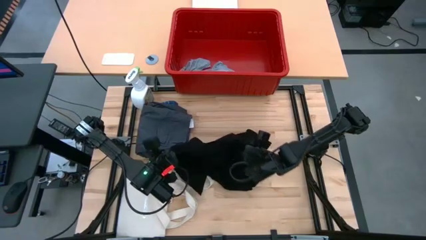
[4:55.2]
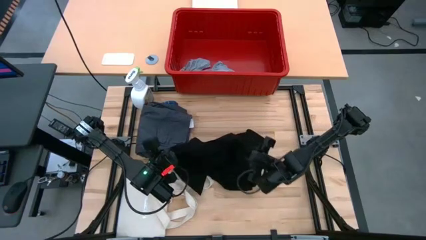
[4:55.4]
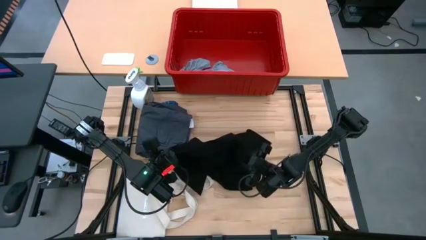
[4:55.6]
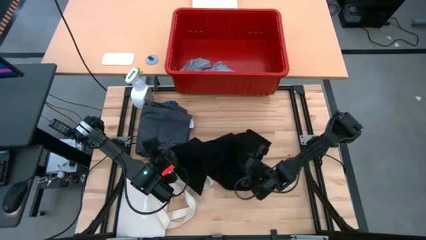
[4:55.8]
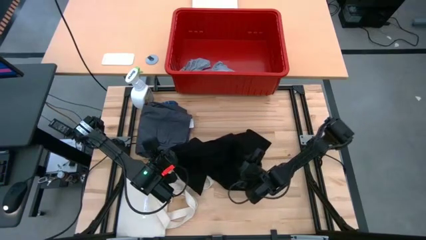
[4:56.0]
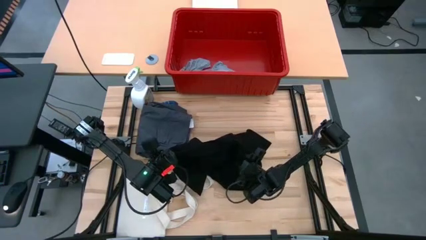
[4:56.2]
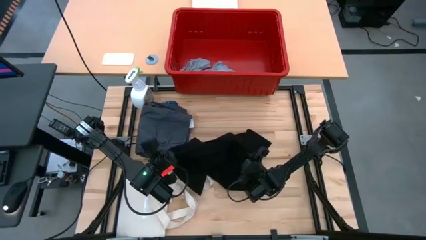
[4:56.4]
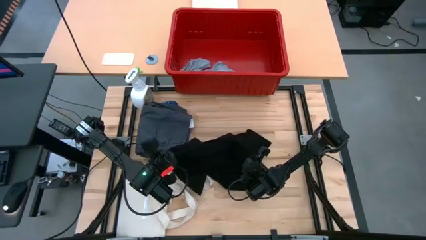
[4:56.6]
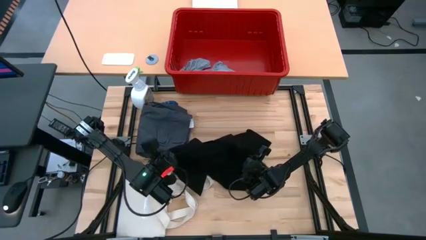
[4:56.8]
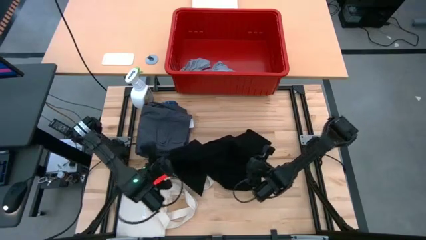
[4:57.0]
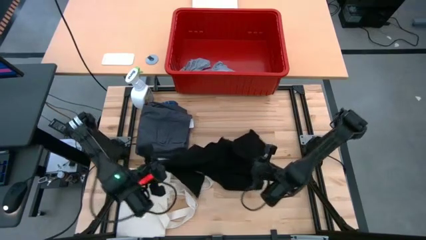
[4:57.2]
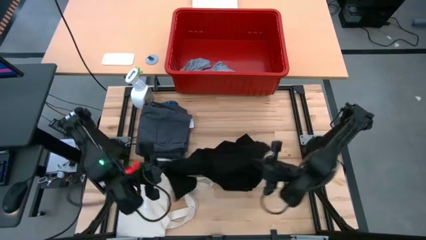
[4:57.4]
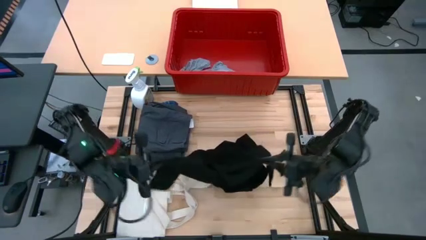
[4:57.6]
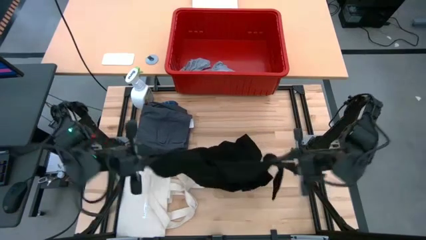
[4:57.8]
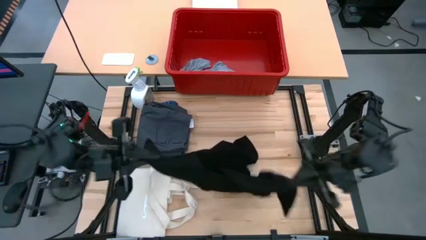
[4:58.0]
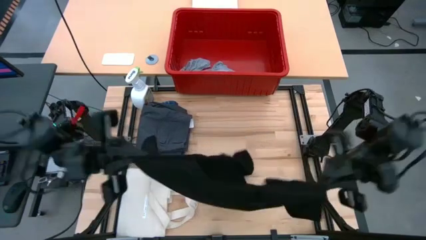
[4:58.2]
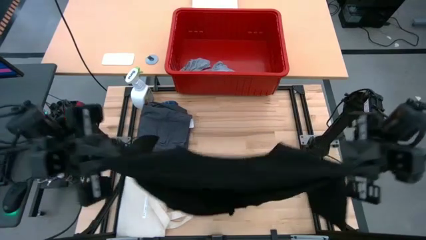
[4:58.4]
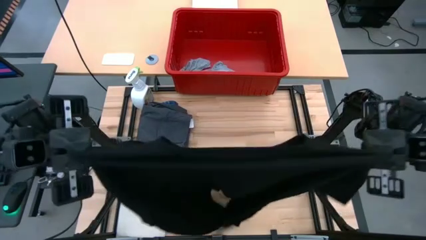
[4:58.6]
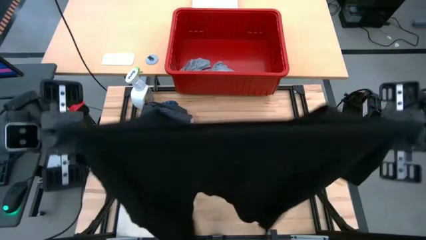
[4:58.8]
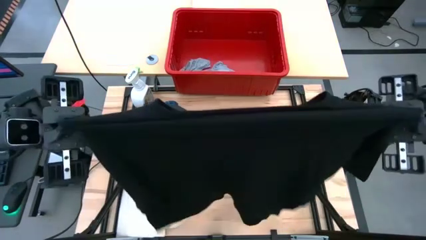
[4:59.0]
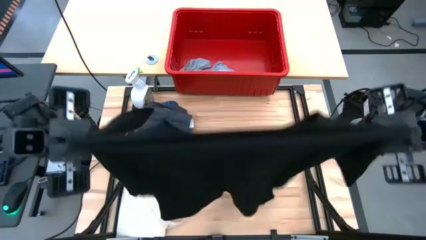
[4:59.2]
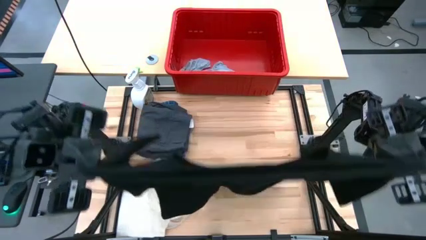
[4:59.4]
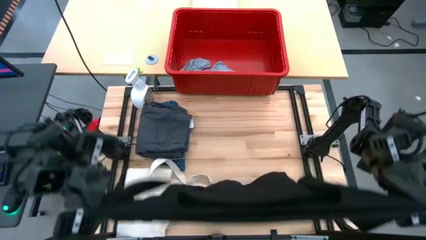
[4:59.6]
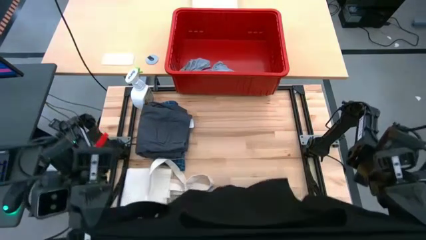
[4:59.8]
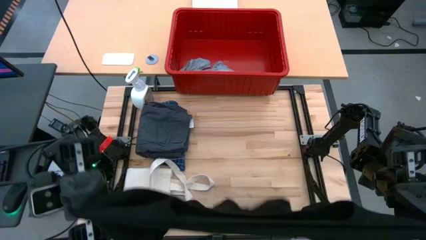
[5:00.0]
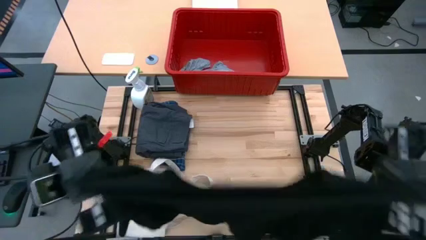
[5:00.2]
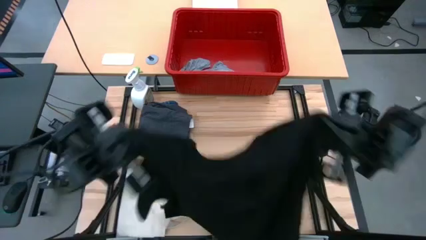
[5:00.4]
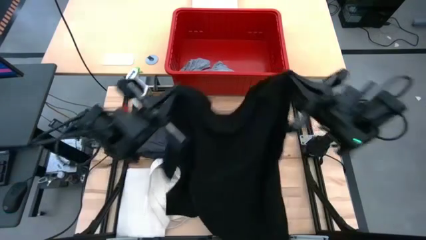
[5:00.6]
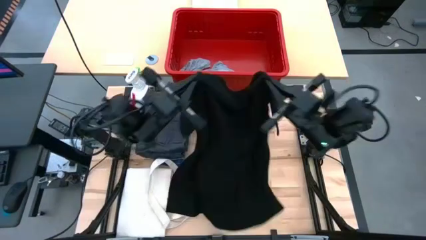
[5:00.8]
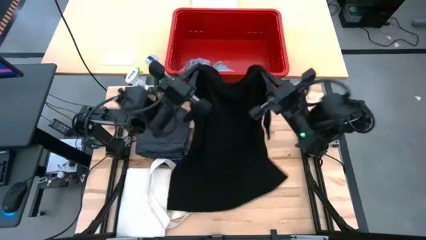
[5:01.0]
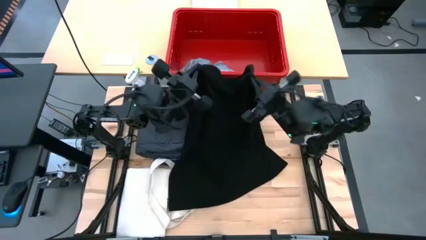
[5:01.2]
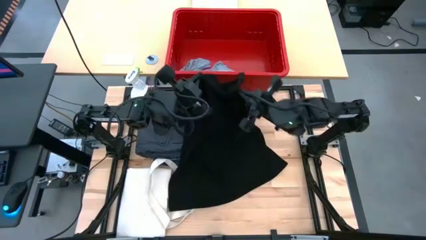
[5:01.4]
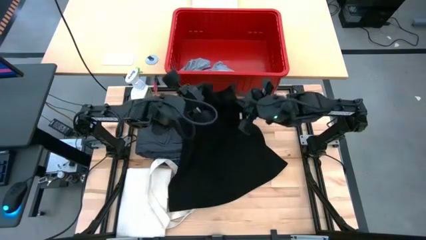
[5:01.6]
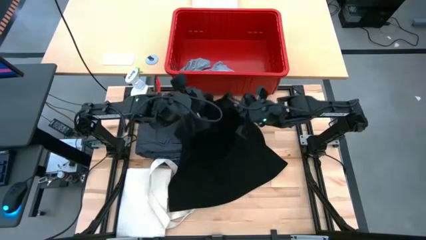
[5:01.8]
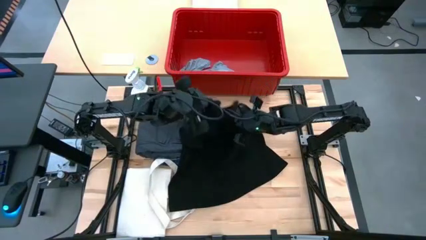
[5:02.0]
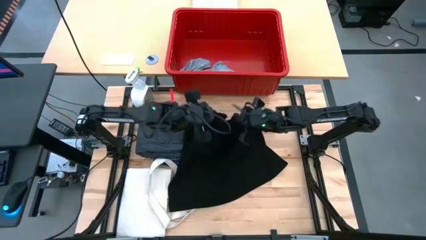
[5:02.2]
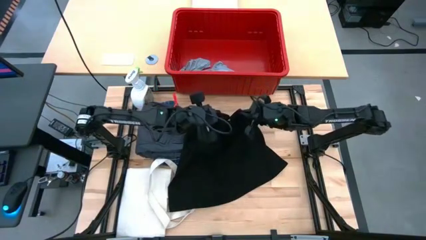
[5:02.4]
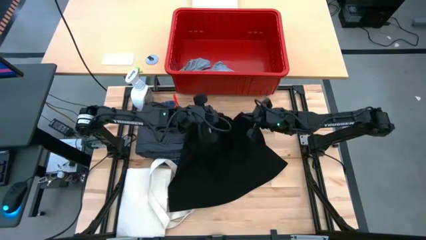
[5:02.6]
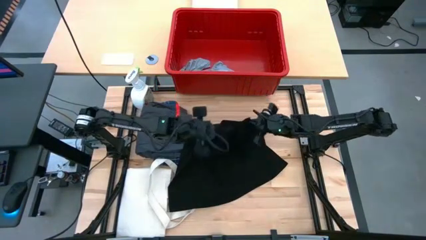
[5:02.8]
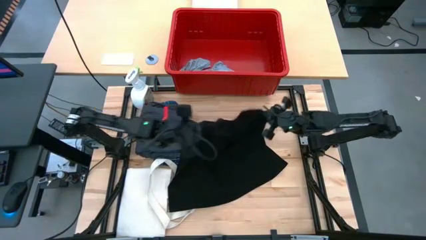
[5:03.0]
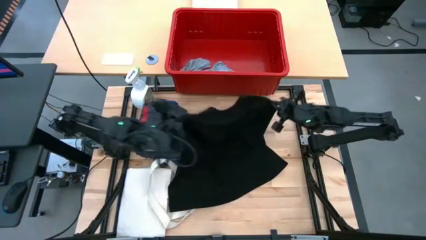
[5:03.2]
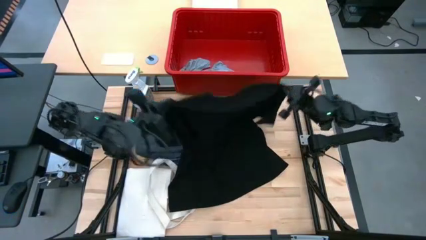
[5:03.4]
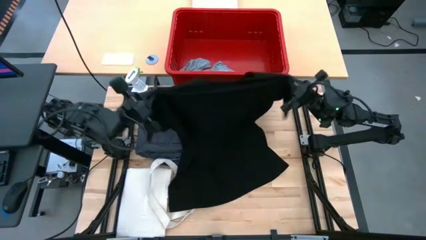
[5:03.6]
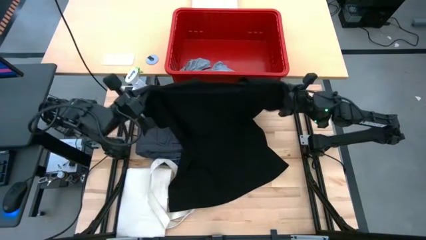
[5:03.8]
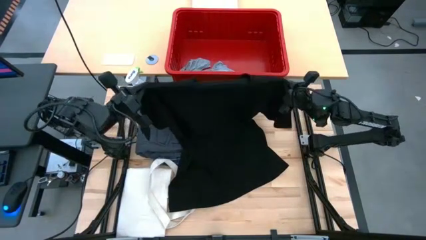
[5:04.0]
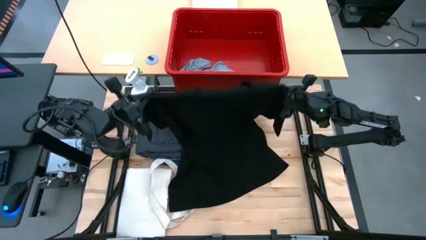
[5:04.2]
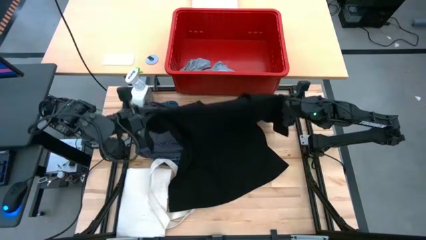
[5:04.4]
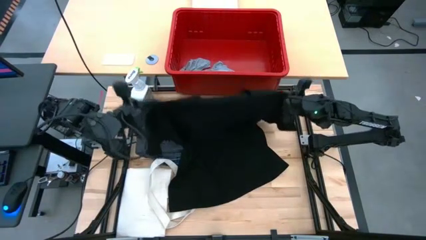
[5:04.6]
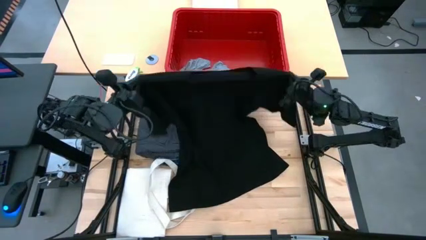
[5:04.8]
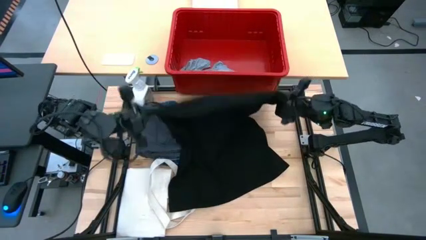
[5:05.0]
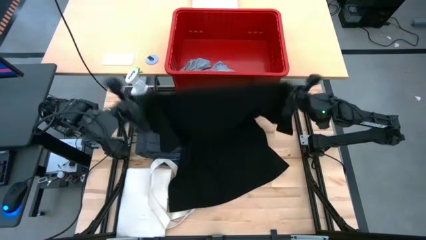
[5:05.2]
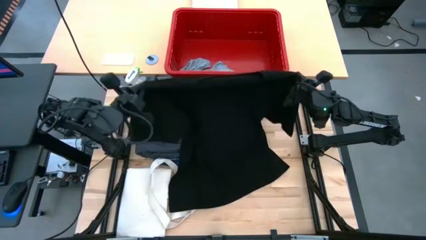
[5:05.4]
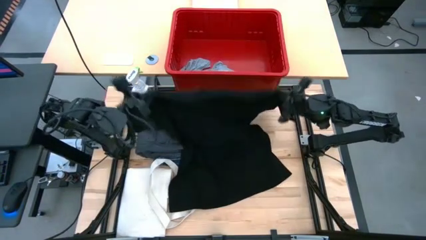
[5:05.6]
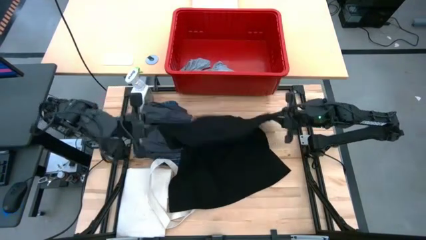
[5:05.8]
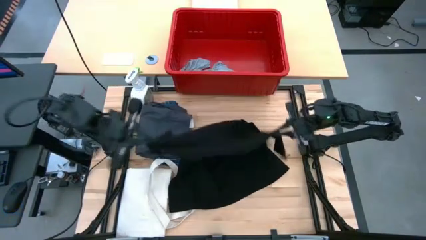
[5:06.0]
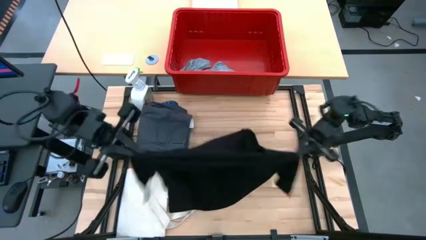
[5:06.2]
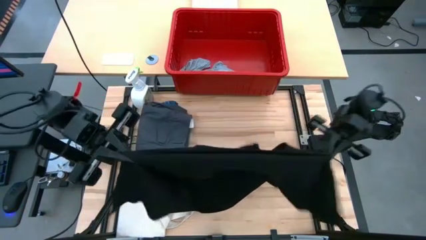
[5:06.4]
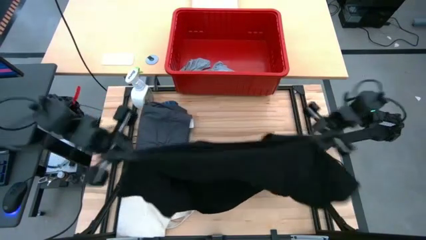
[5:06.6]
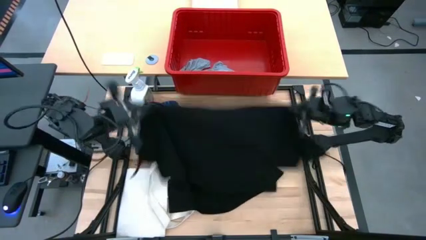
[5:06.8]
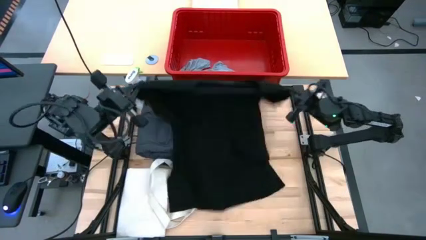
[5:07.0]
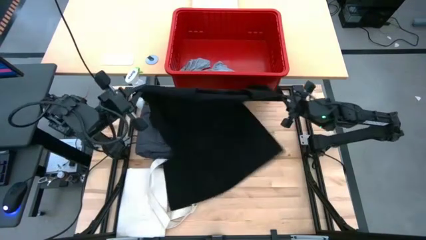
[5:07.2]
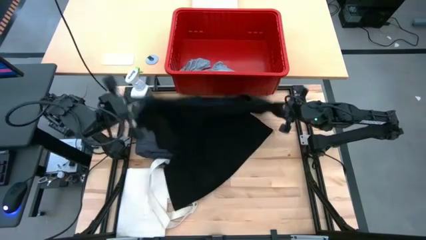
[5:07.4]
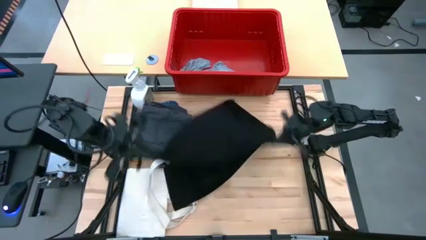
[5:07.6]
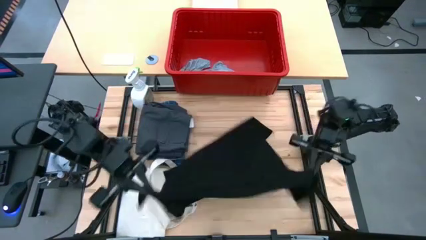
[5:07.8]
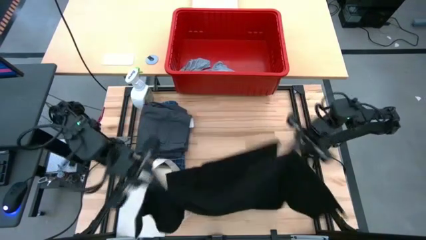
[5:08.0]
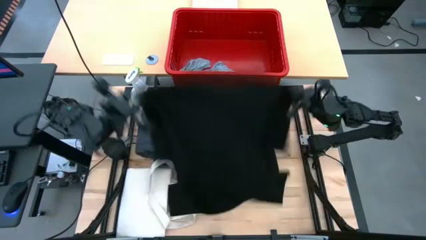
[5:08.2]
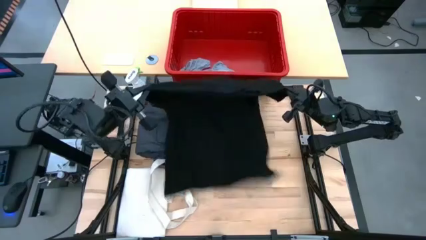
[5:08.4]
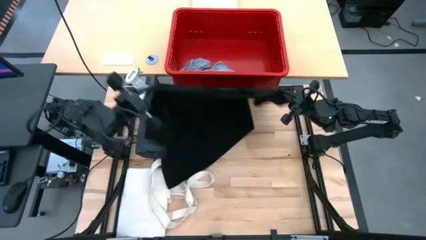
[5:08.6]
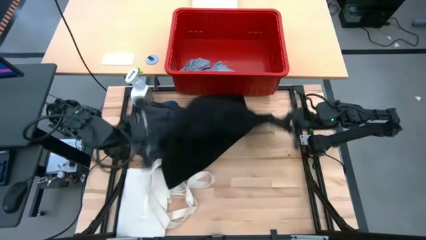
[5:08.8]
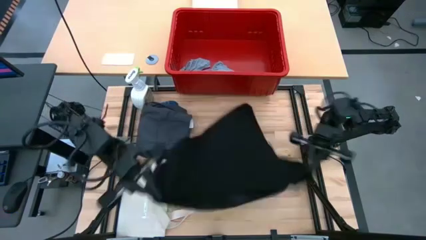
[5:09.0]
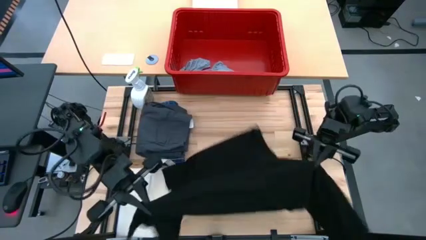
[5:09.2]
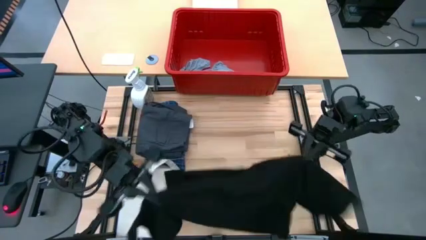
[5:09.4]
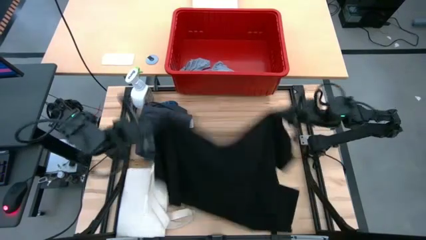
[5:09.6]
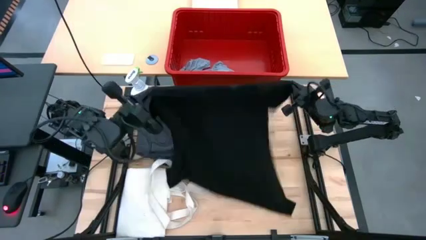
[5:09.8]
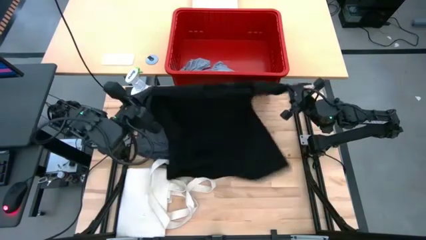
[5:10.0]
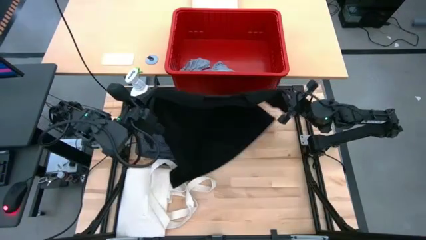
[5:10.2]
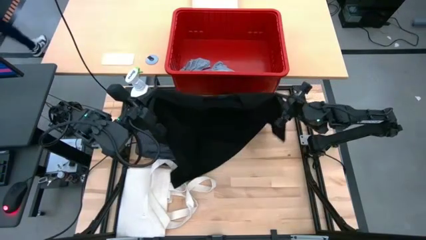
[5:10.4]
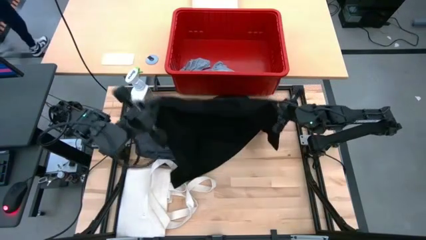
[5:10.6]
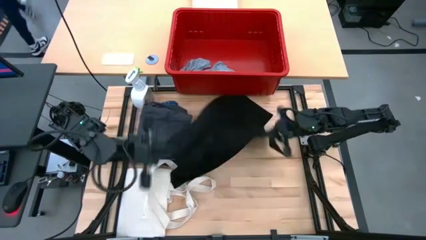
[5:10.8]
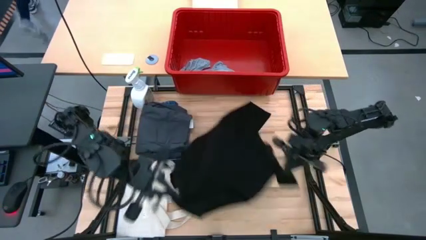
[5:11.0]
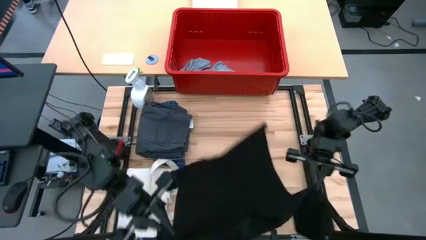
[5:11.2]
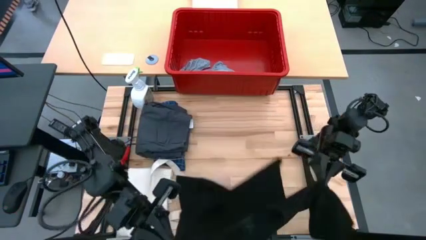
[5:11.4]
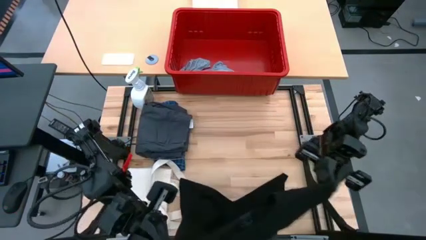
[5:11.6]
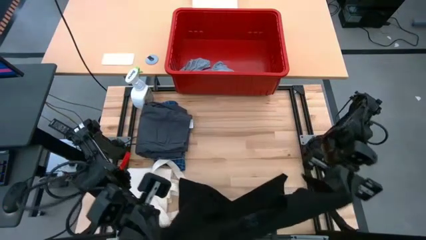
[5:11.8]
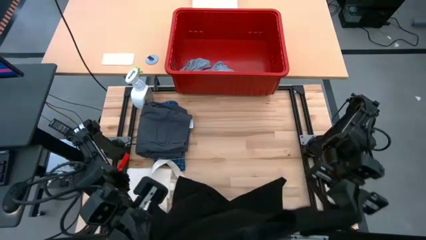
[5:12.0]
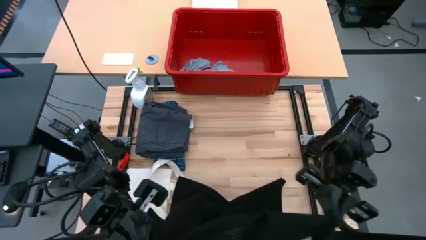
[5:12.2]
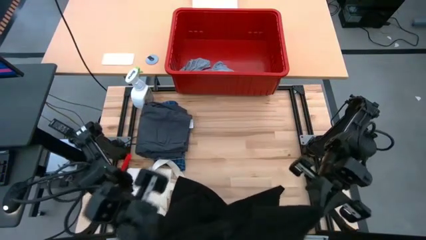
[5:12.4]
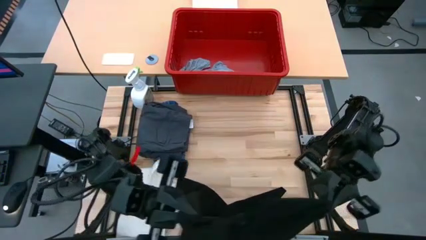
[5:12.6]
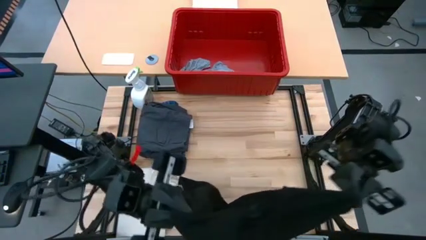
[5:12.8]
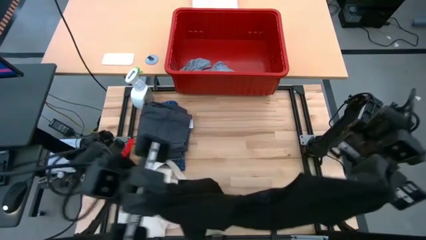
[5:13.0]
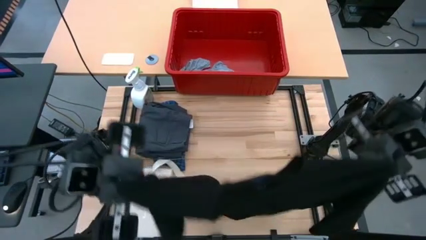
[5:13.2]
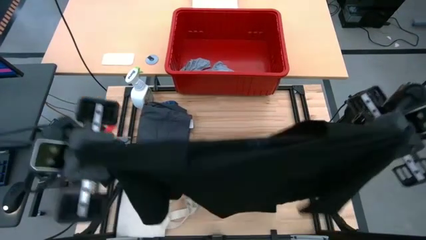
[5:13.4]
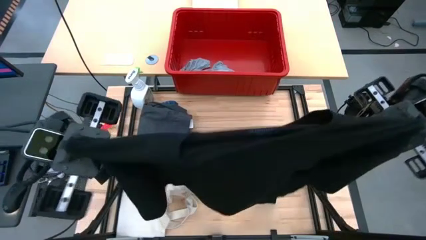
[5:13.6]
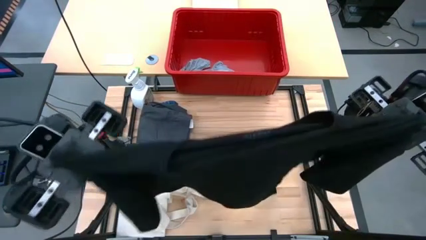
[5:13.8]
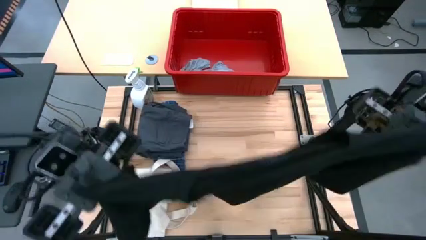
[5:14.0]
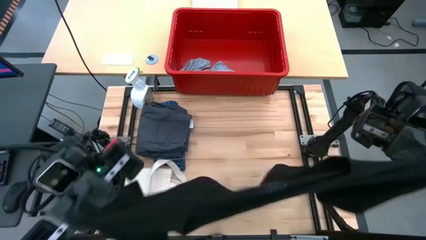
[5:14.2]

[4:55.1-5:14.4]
Task: Fold Laundry from Bin
Fold the black shirt
